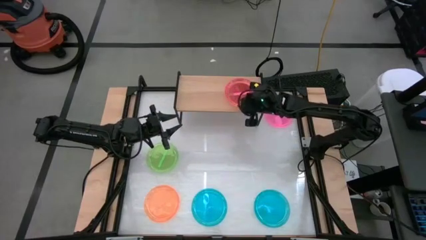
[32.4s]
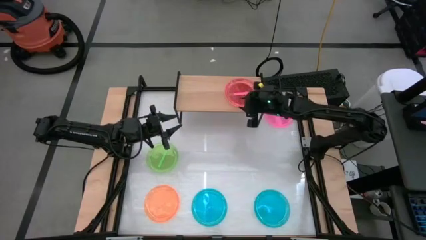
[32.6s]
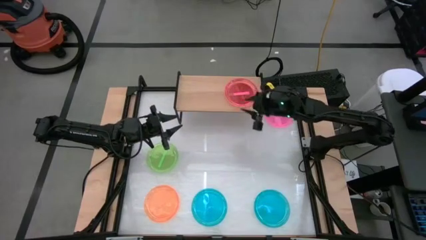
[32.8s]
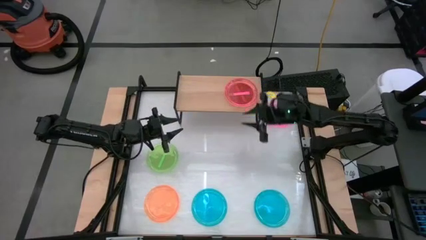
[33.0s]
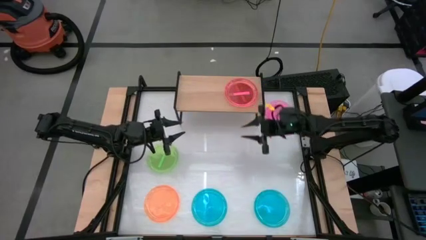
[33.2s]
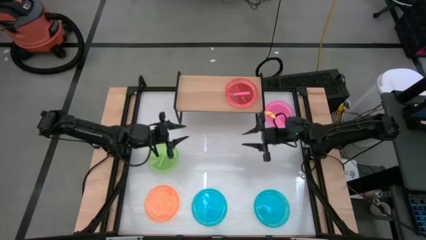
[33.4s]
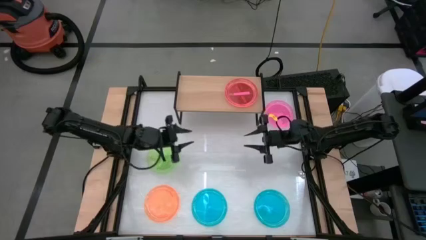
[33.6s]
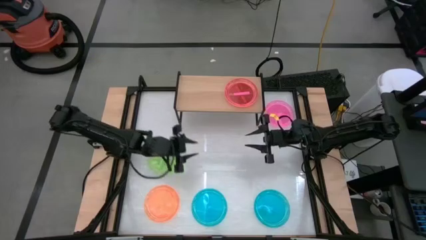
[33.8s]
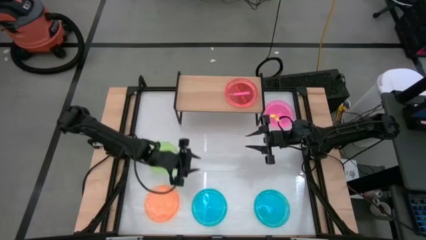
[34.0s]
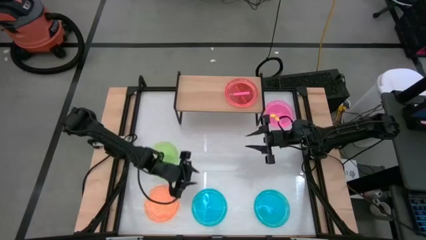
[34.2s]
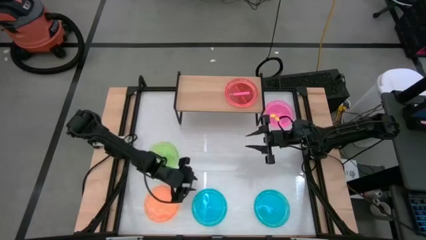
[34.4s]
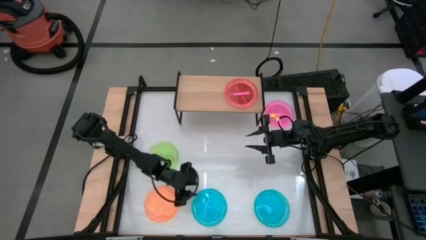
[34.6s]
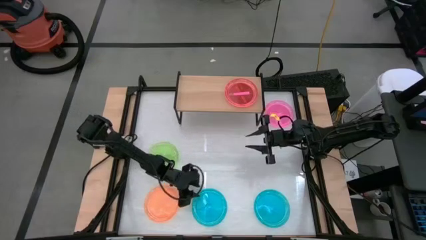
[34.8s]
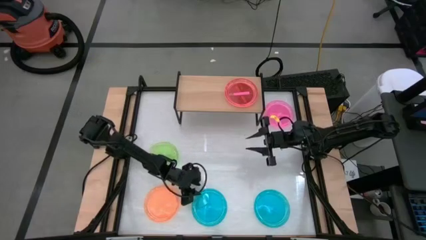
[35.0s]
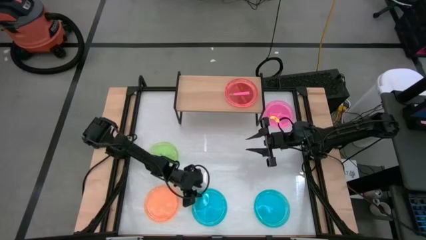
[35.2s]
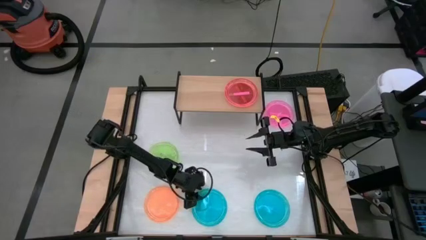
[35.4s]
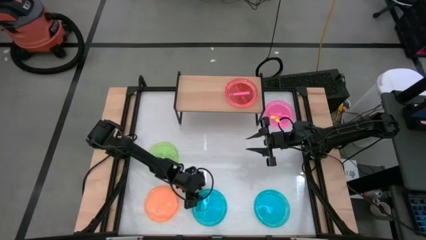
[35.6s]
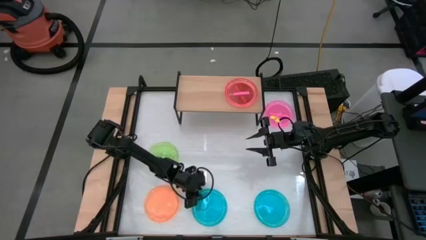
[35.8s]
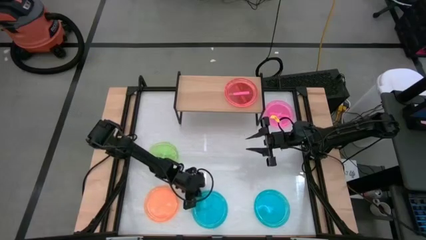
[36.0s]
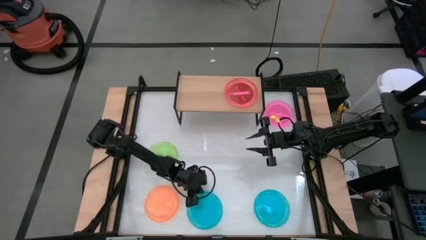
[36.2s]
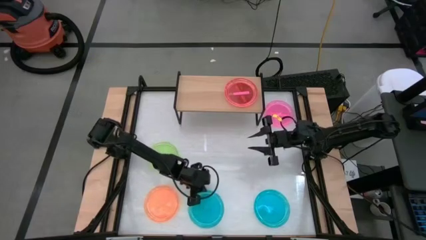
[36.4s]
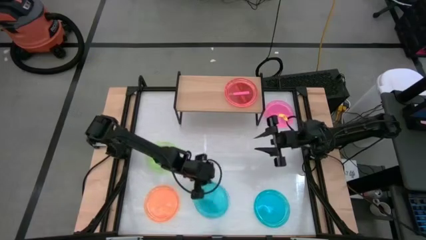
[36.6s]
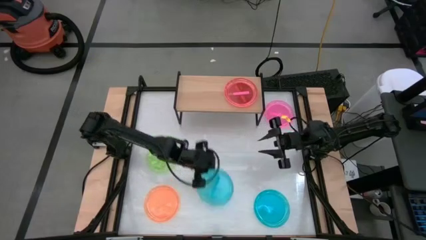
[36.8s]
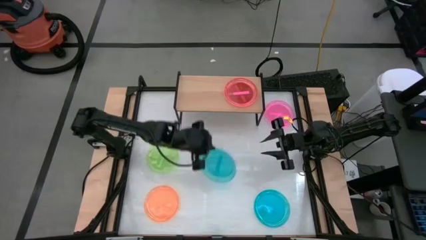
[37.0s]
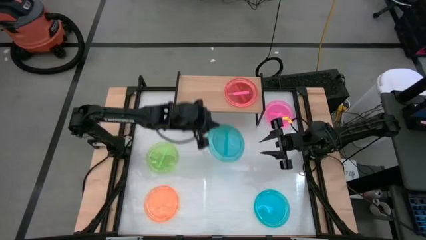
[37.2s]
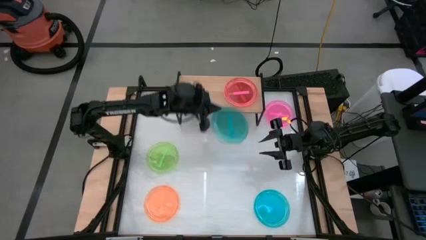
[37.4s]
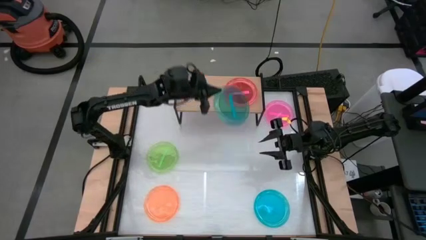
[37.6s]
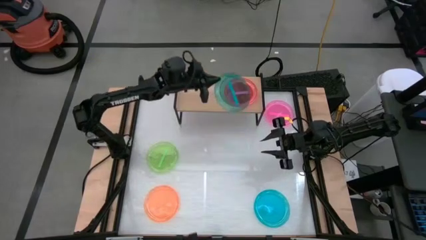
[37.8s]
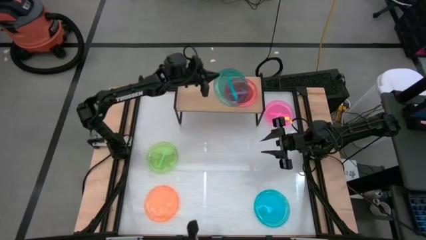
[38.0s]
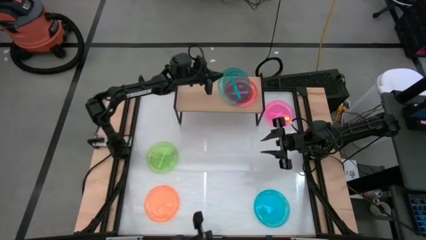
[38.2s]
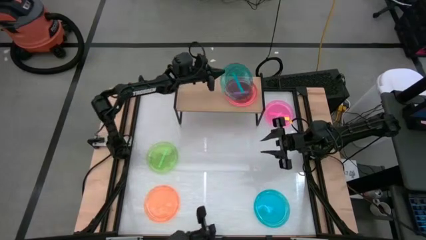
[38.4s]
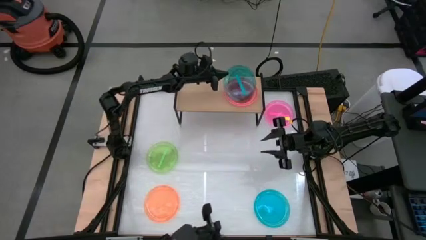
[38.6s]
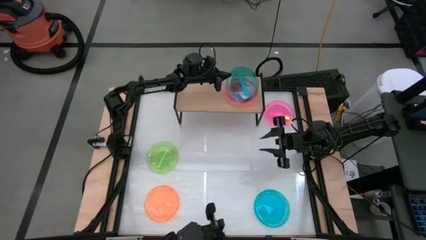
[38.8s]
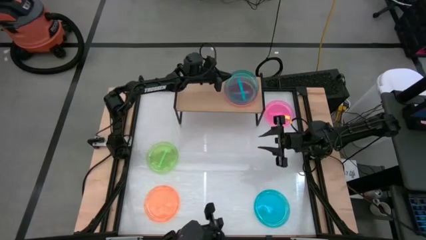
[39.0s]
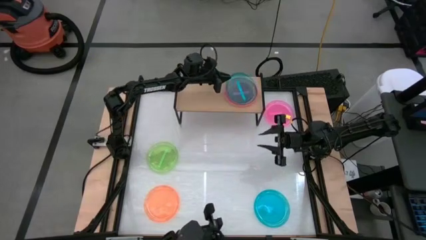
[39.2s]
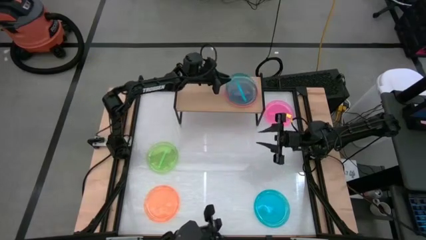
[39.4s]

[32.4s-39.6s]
Task: Place and stack plates onto a shelf
Stack the left blue plate on top of the pink plate on the shelf

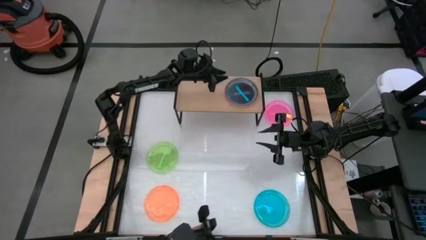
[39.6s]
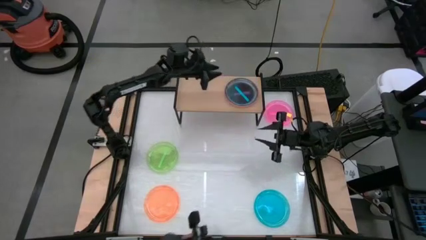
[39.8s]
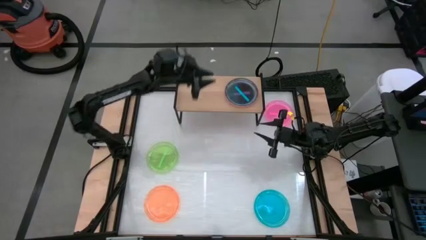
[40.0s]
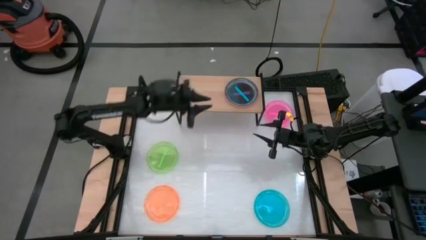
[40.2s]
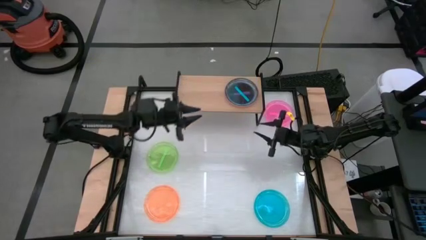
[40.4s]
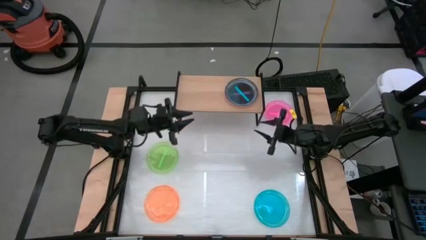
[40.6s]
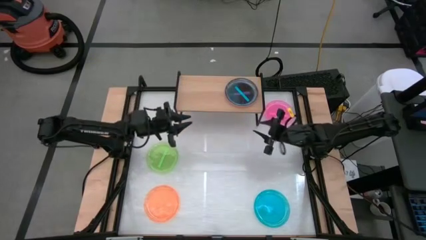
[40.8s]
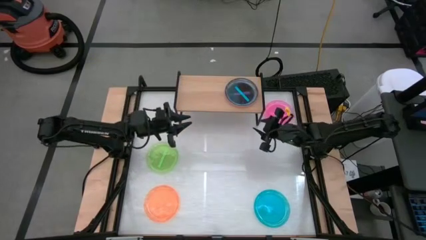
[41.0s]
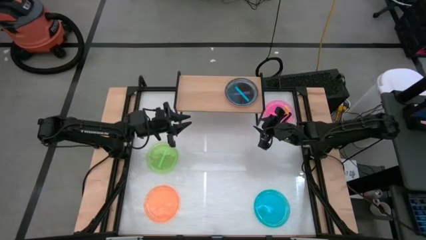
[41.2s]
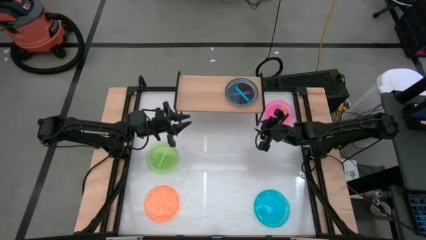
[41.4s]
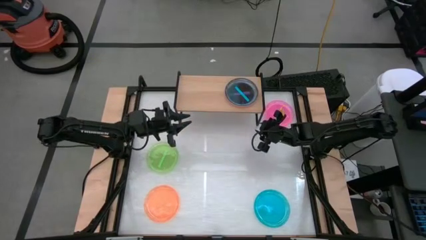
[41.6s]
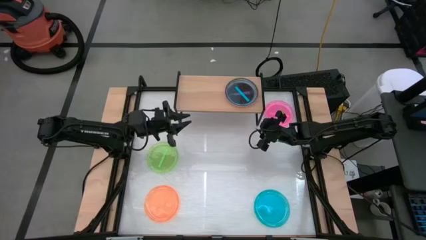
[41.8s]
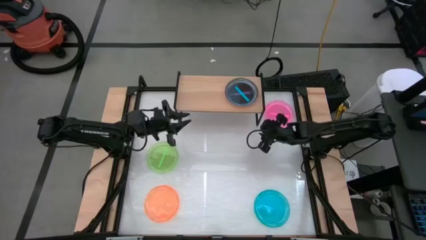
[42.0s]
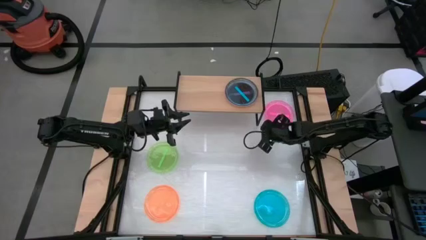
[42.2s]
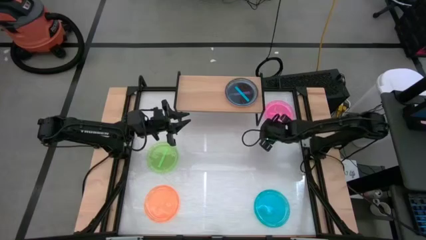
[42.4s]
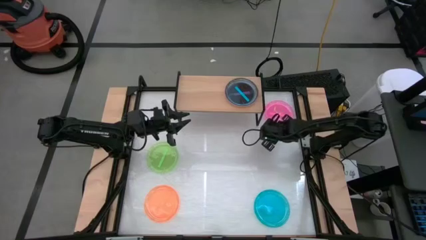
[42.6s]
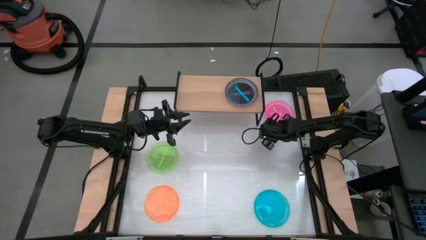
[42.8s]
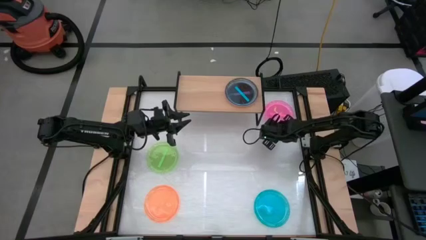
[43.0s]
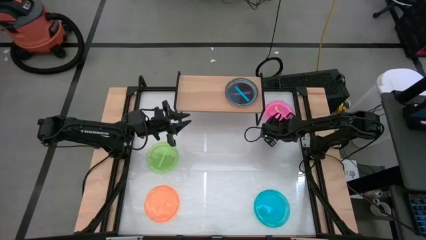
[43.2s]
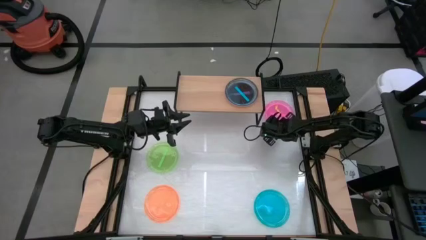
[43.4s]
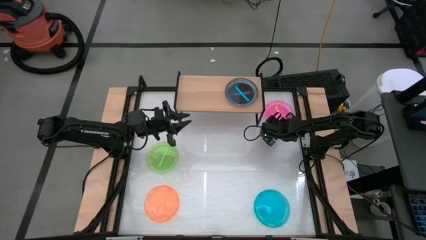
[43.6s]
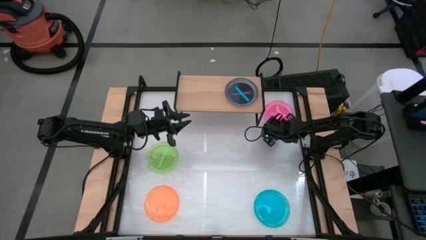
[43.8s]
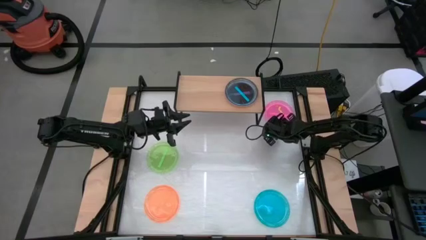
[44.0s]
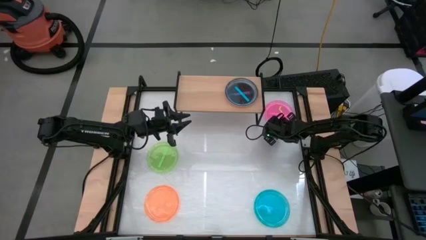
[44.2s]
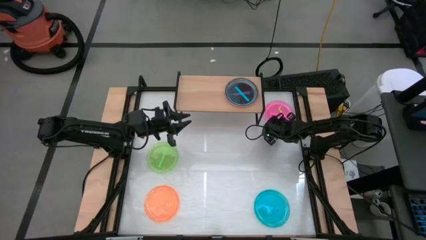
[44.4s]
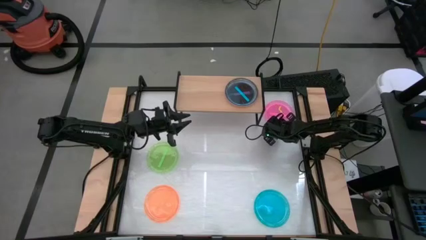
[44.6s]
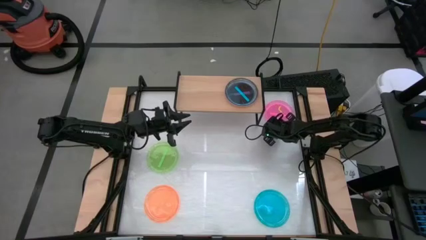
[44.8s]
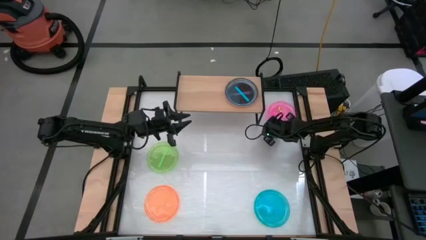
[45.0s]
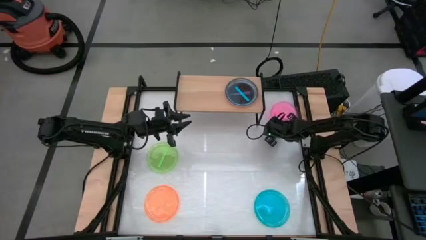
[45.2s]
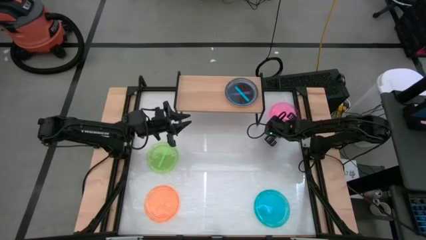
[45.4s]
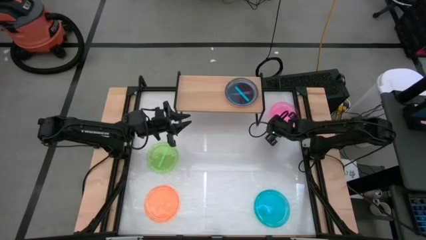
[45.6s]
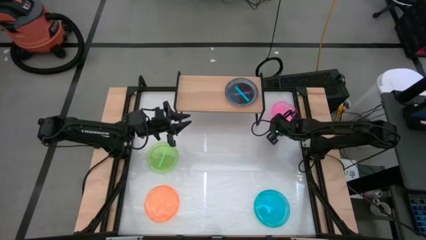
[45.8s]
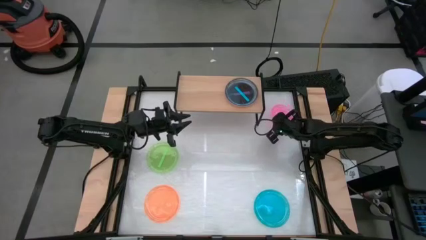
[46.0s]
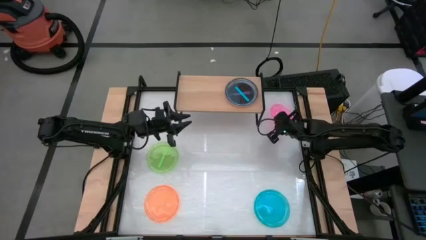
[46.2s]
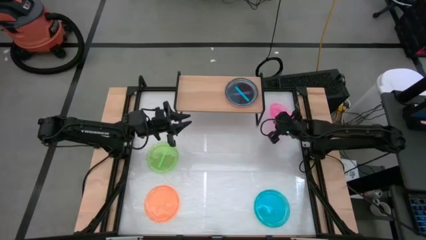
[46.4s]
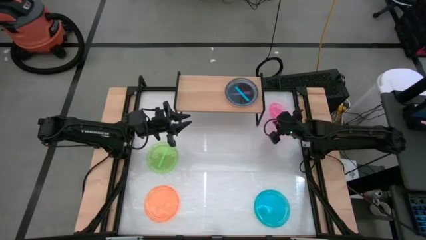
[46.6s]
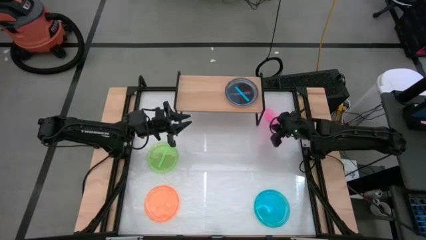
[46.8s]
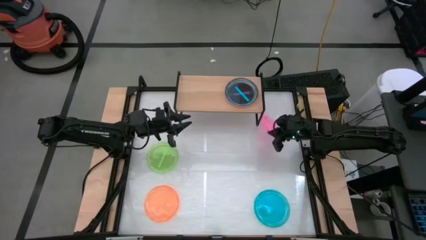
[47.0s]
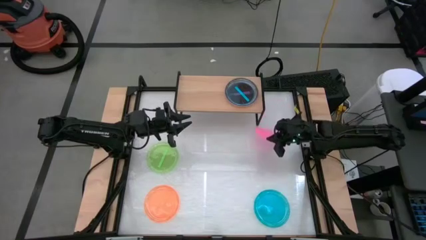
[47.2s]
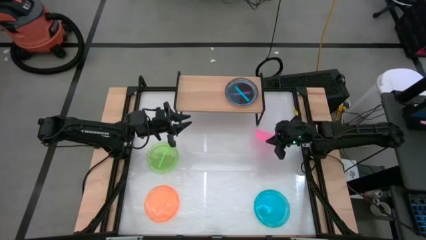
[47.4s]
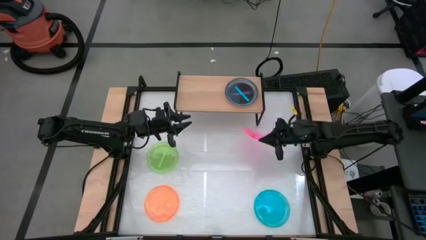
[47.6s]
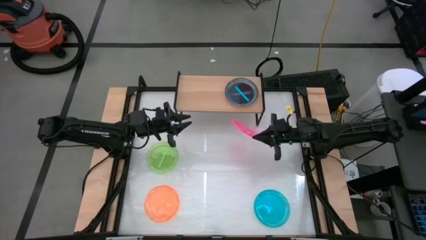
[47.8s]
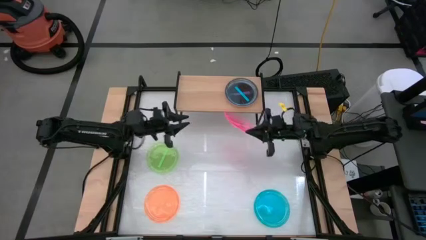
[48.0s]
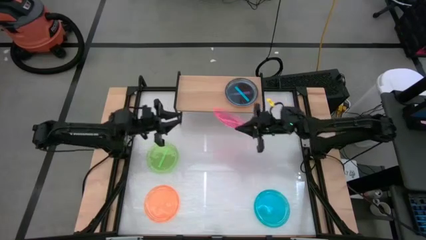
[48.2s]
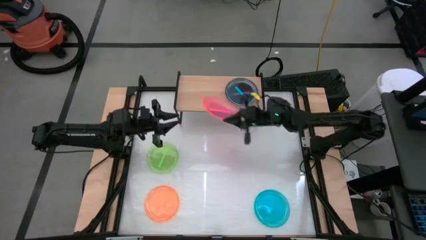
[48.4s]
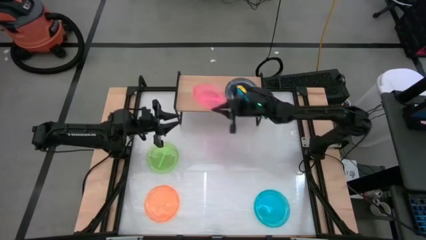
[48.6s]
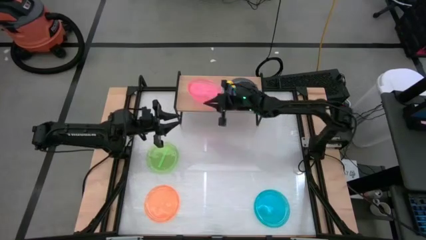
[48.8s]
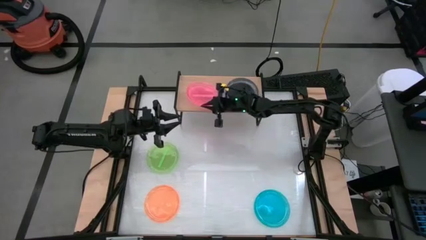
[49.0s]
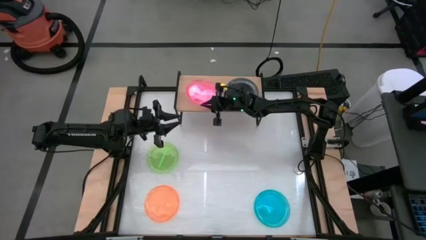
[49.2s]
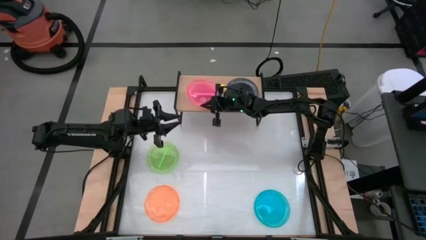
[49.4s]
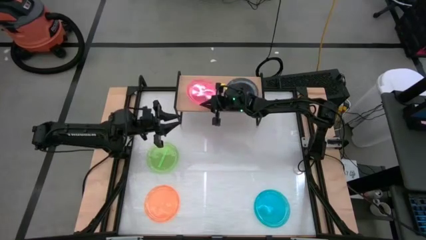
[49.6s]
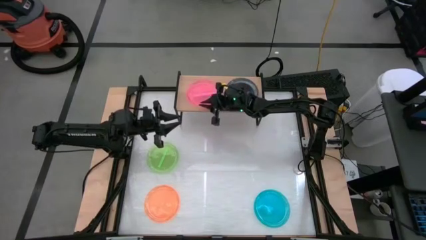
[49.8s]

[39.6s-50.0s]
Put the pink plate on the shelf
